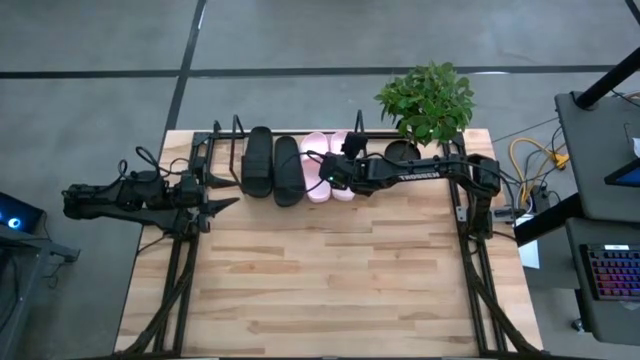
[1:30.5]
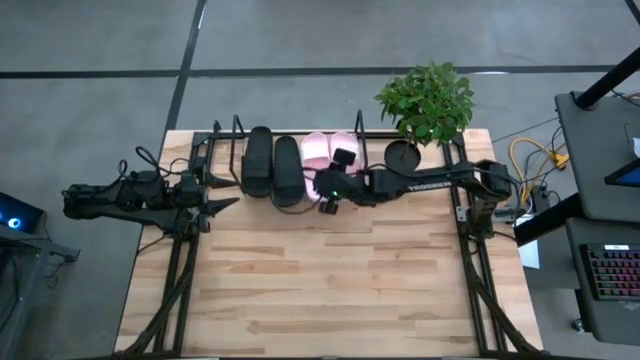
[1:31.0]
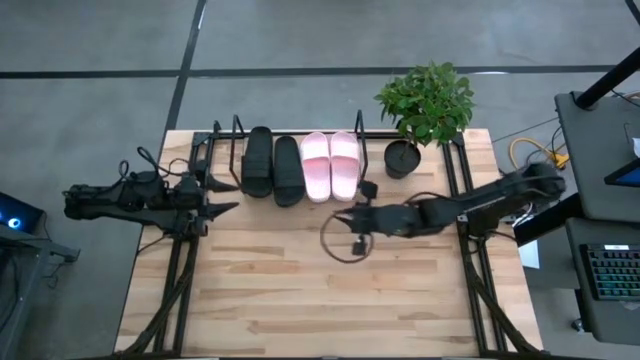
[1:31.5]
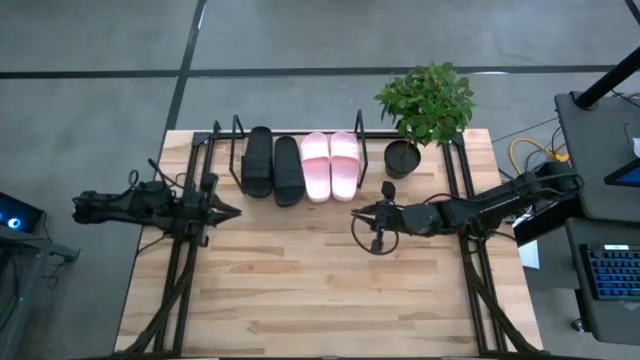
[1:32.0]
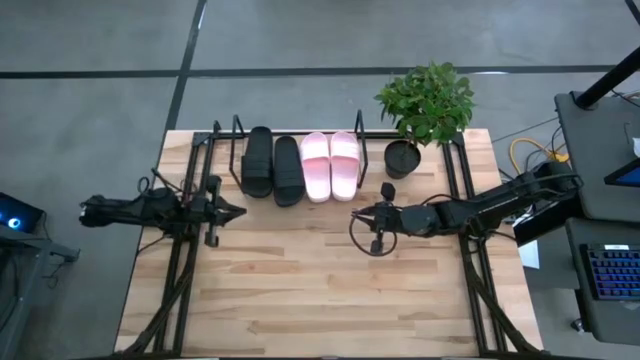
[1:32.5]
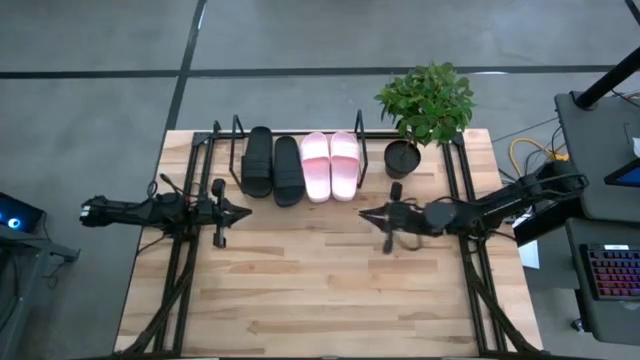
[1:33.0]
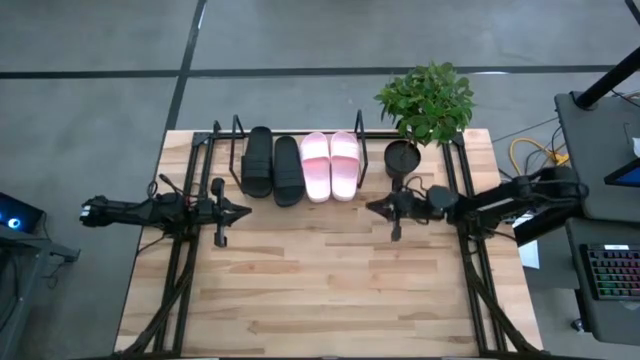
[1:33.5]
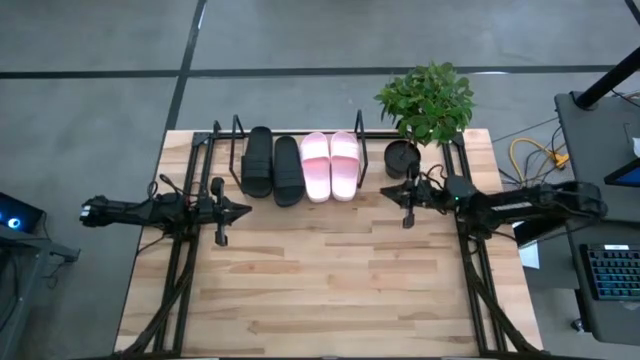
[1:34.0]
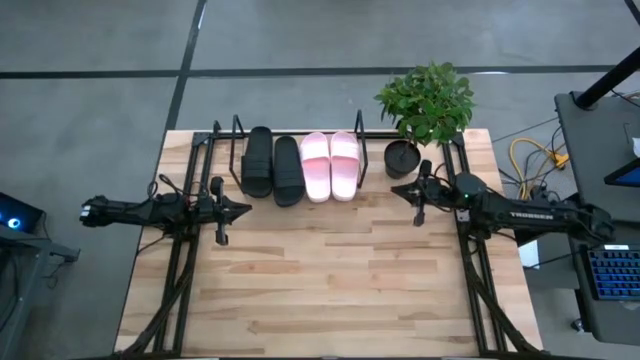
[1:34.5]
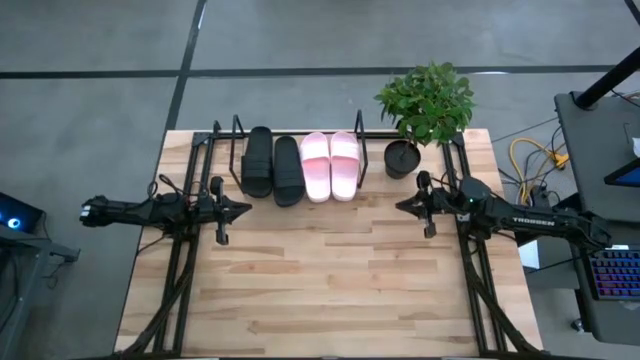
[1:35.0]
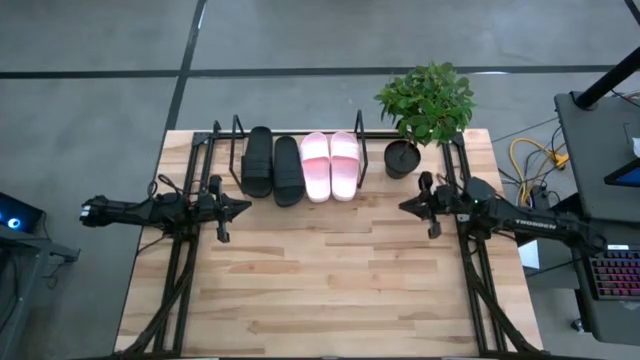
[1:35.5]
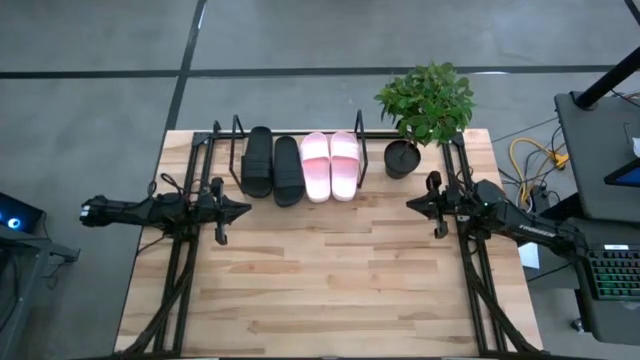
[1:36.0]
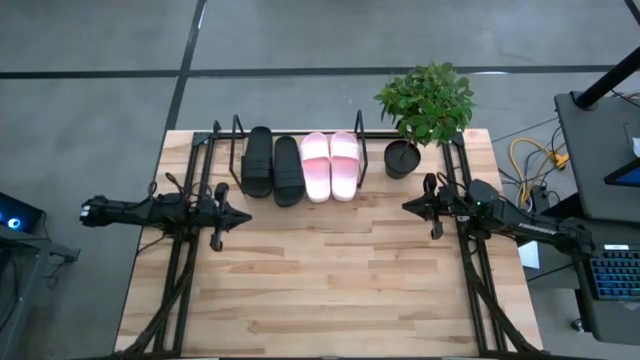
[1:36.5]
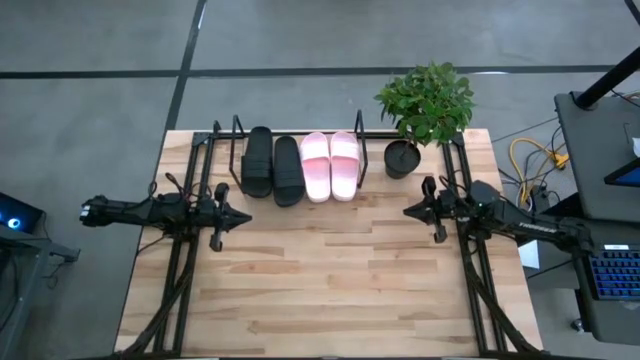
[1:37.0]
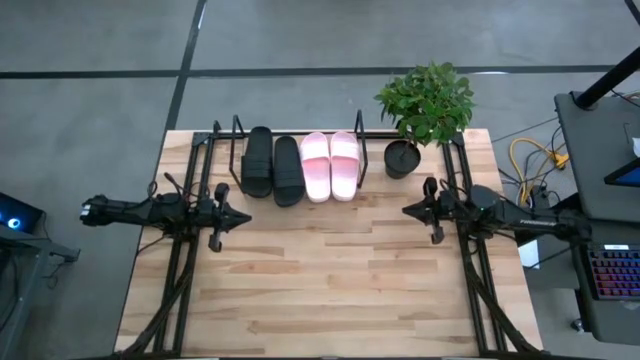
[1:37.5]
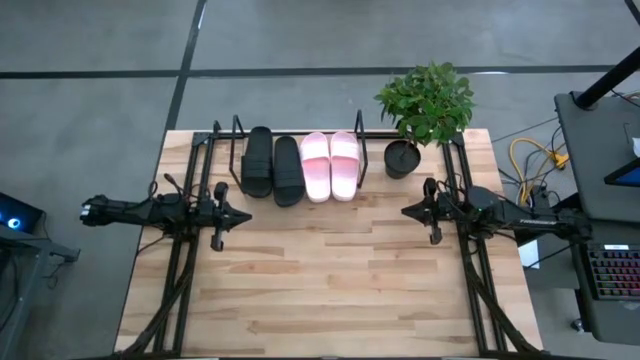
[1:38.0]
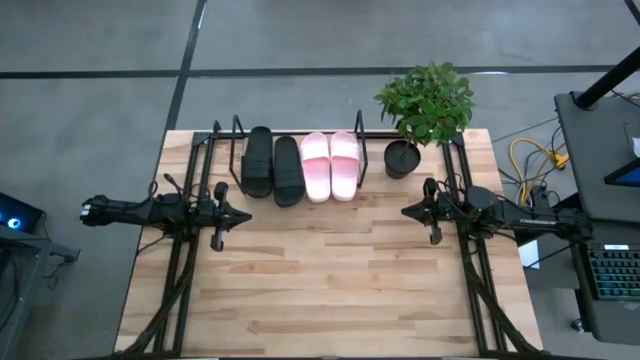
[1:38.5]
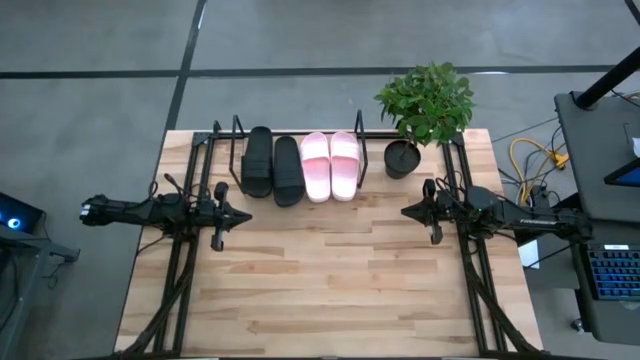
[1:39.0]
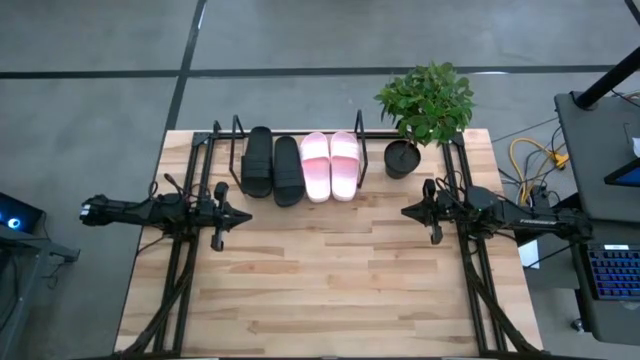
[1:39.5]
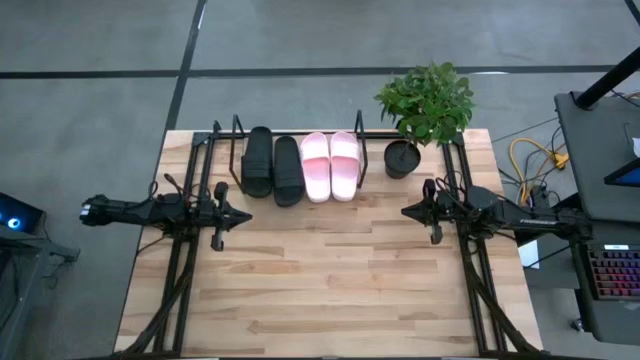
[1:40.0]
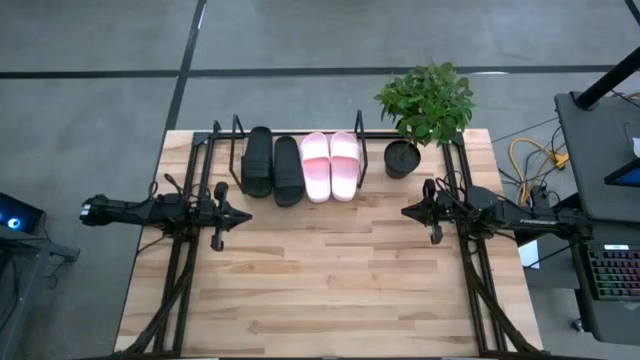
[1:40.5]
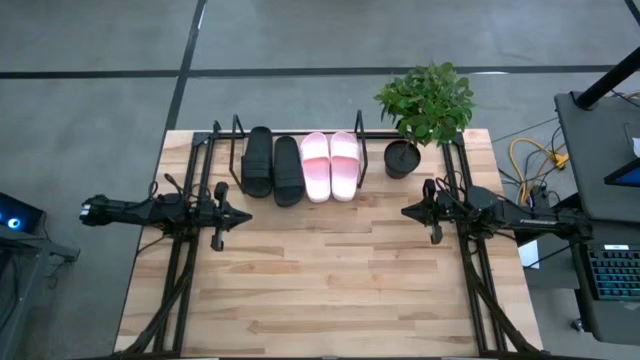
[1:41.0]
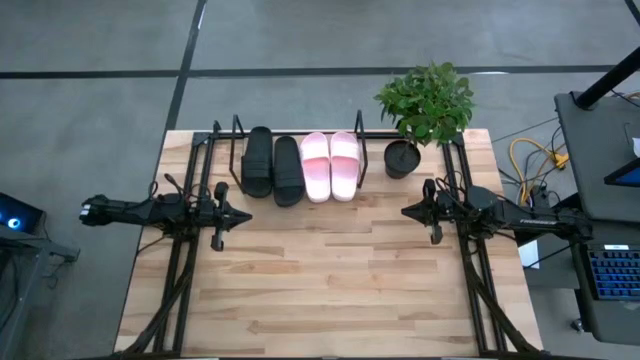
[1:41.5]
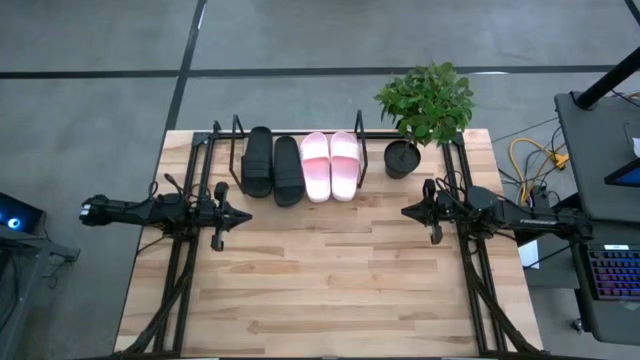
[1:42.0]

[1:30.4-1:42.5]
Task: Pick and place slides into the shelf
Return to Home Position

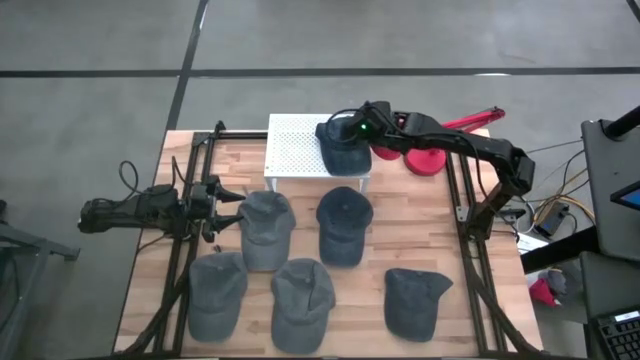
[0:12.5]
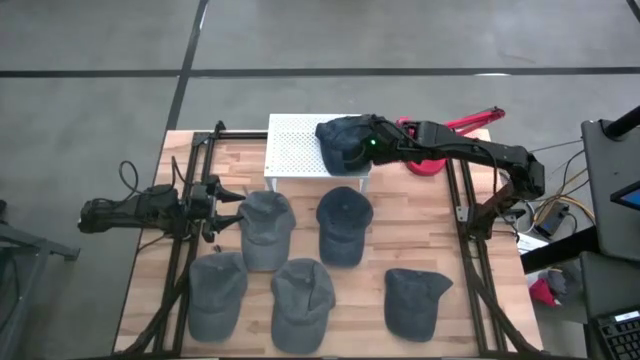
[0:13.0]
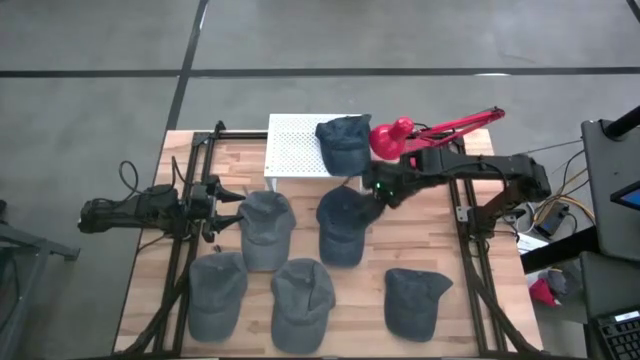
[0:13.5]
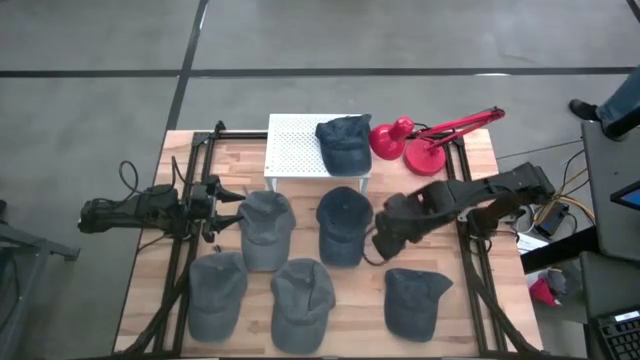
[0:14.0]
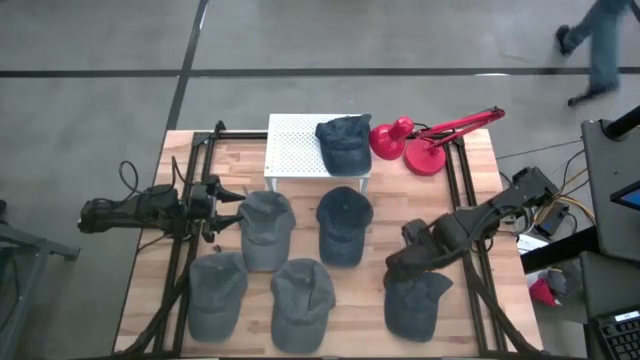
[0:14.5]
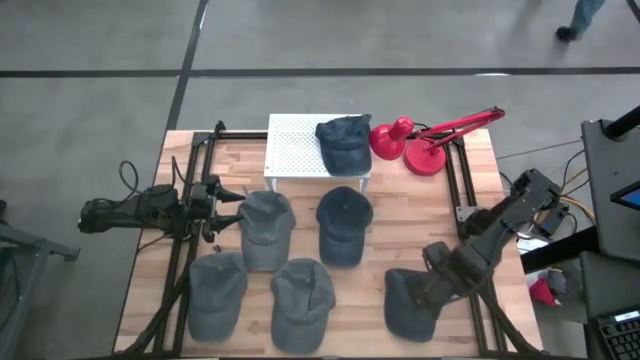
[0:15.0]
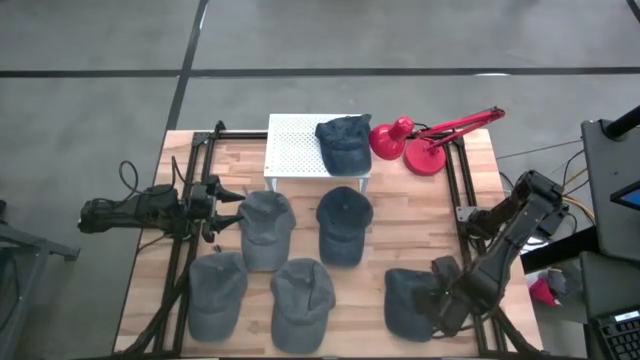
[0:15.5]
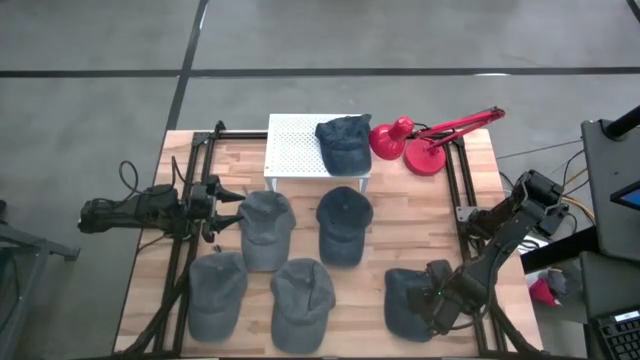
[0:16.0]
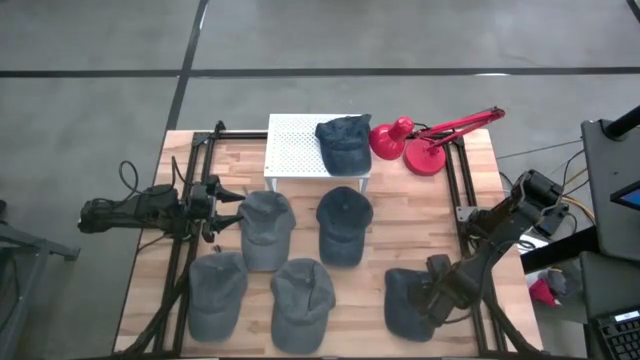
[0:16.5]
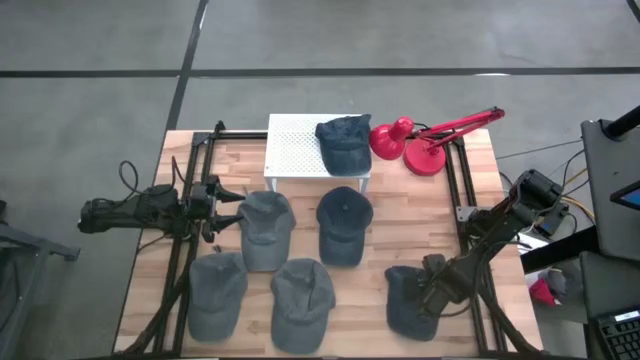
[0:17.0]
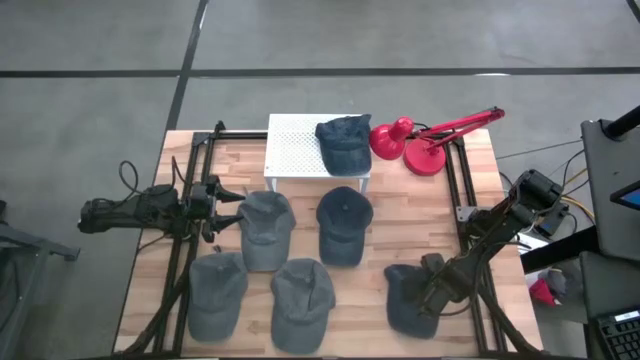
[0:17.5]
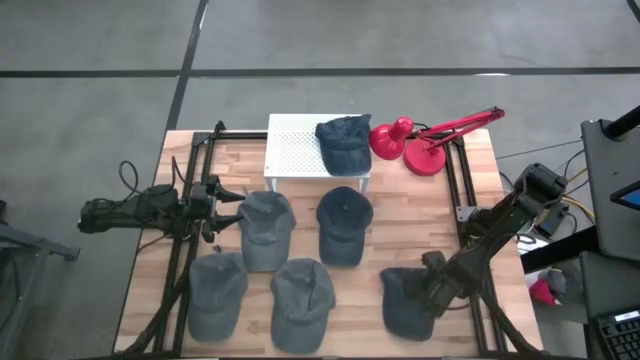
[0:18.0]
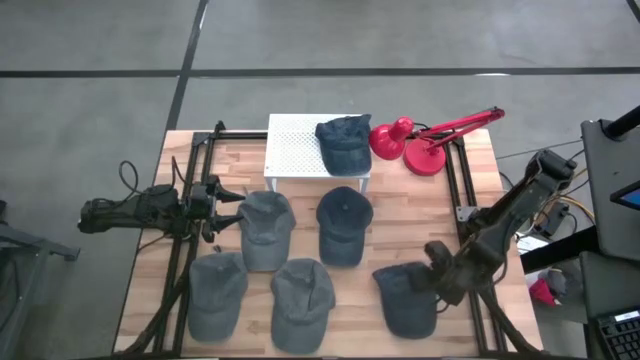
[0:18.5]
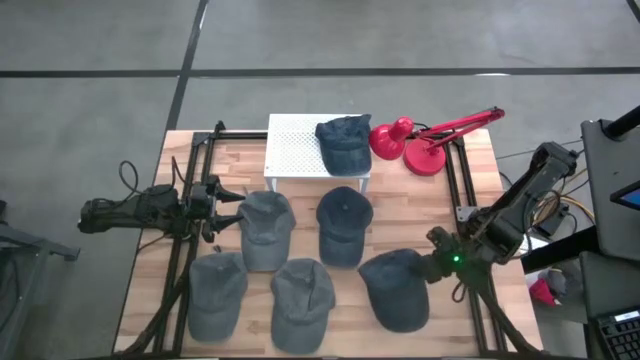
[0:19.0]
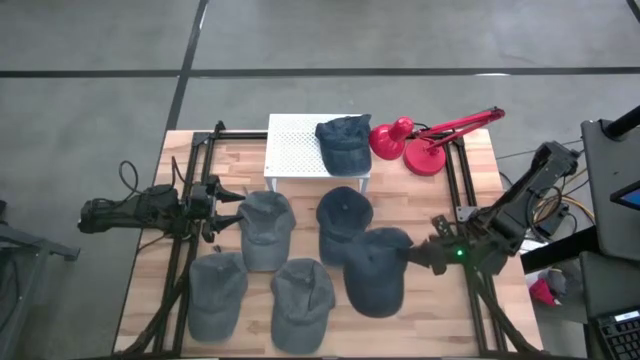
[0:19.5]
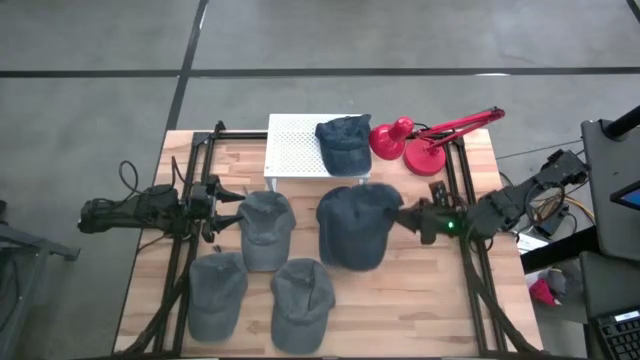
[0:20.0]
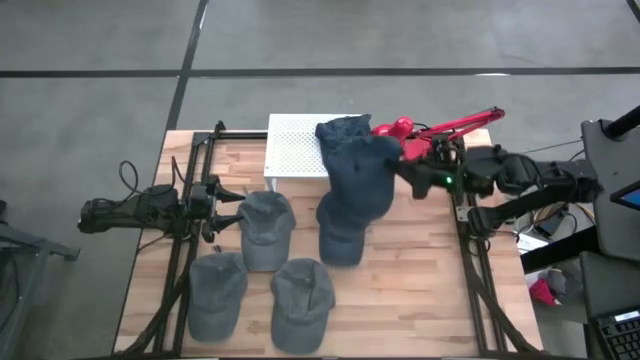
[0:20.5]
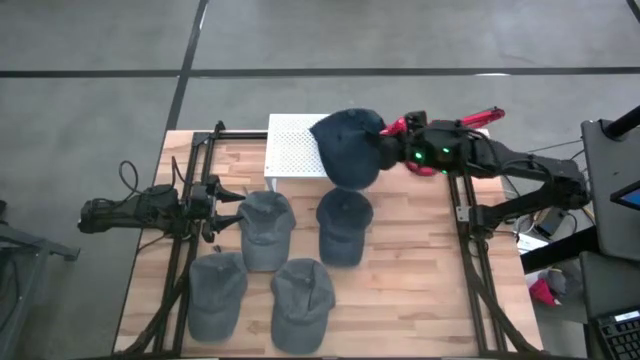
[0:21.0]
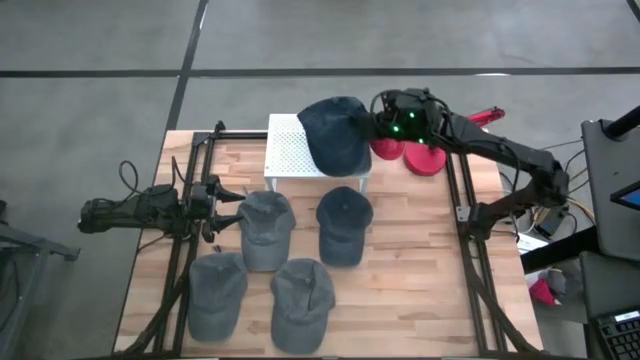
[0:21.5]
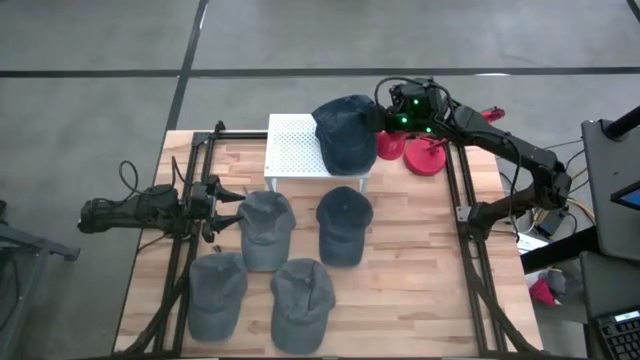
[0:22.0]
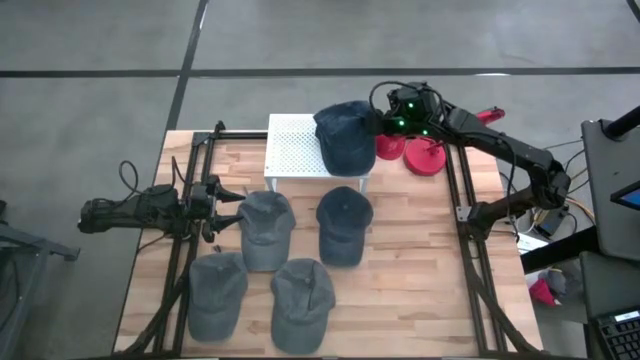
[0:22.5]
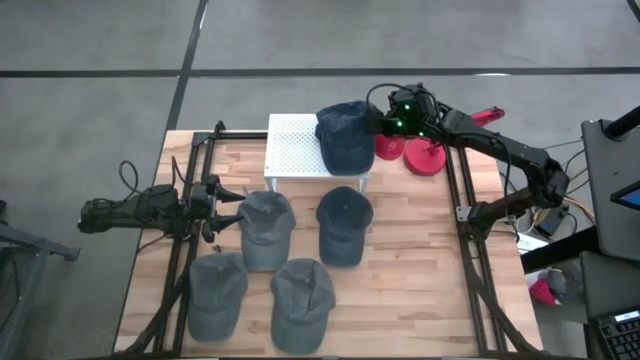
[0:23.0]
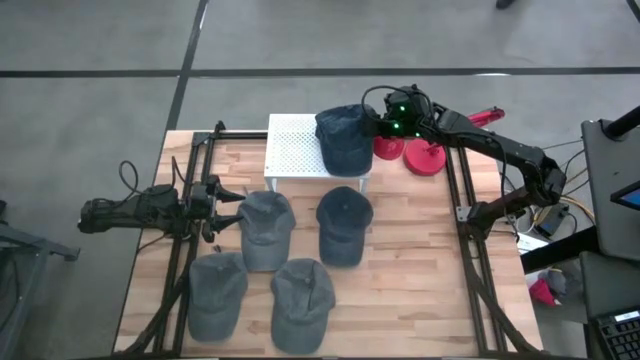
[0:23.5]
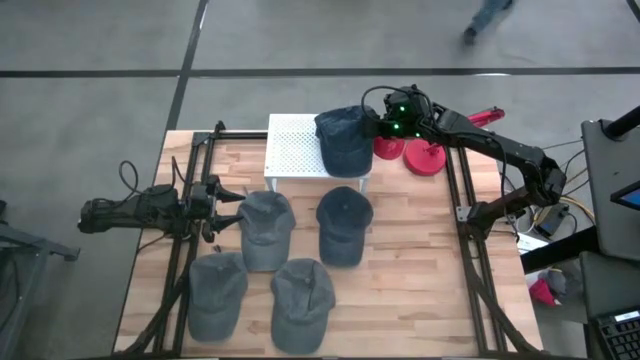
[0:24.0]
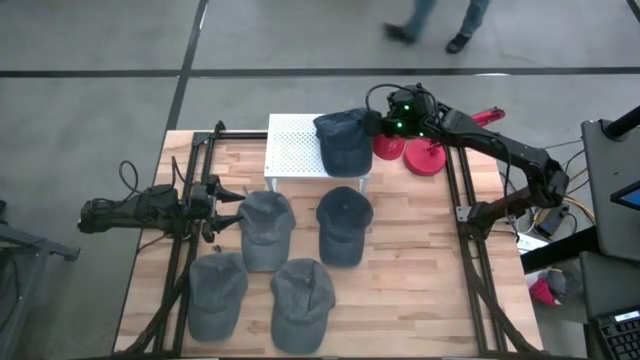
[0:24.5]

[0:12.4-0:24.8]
Task: Pick & Place hat
Stack the bottom dark blue cap on the dark blue cap on the shelf
